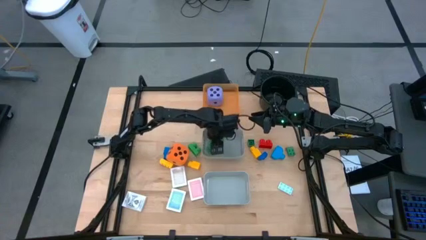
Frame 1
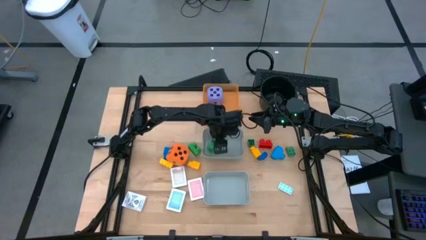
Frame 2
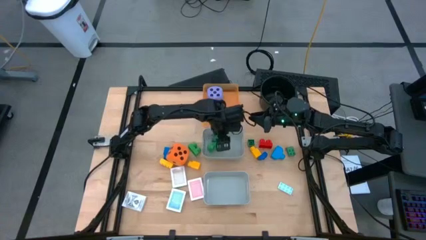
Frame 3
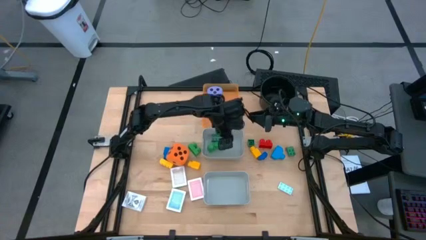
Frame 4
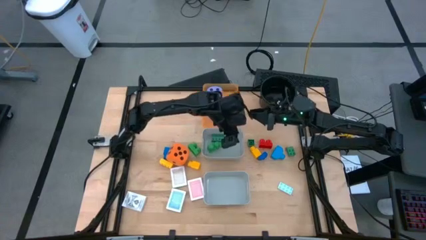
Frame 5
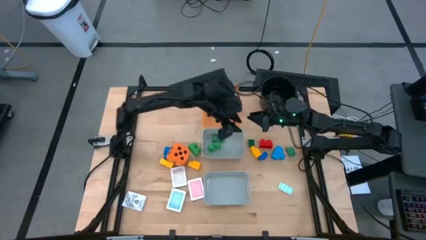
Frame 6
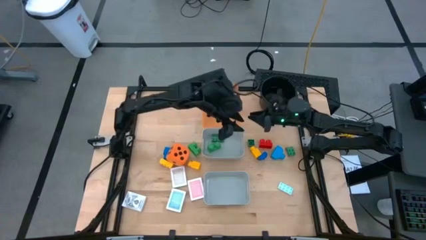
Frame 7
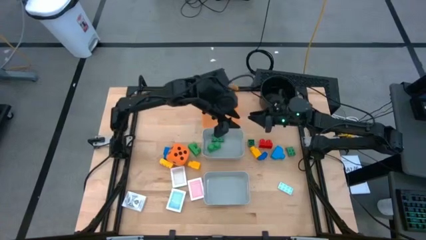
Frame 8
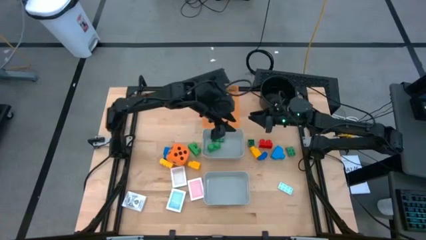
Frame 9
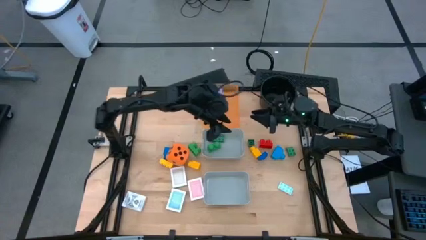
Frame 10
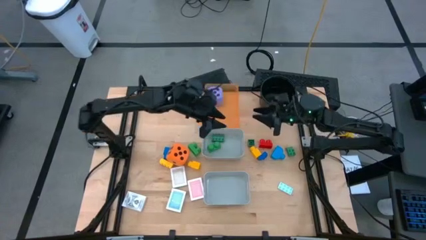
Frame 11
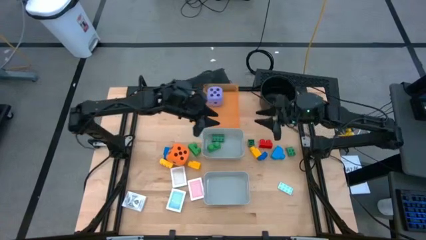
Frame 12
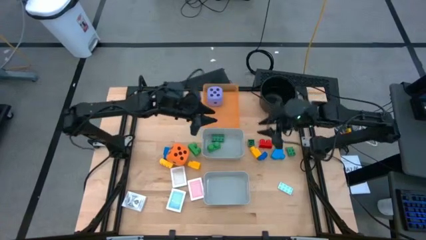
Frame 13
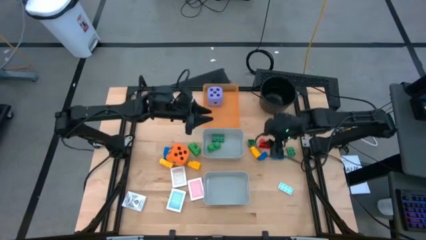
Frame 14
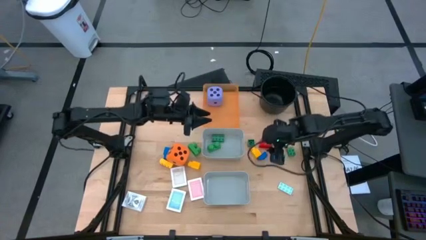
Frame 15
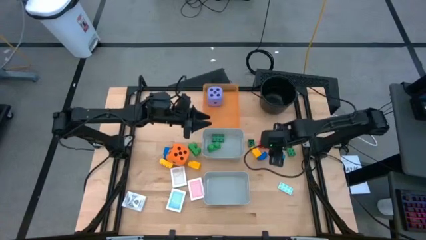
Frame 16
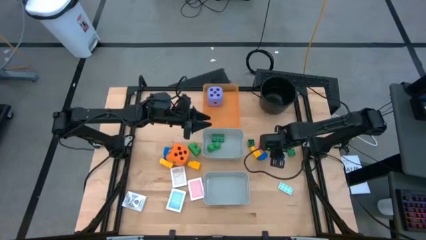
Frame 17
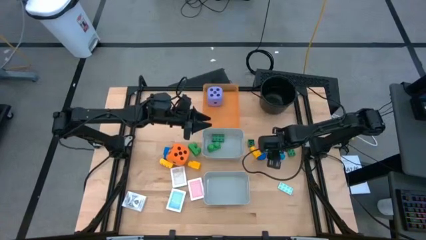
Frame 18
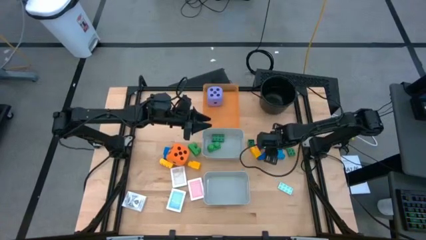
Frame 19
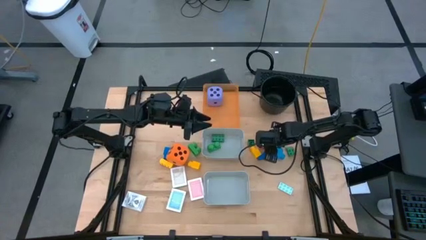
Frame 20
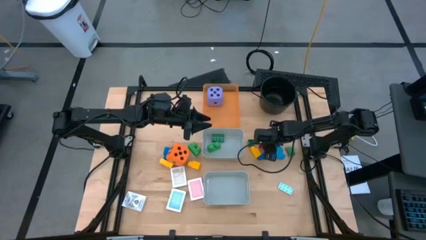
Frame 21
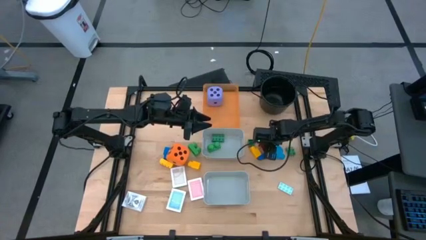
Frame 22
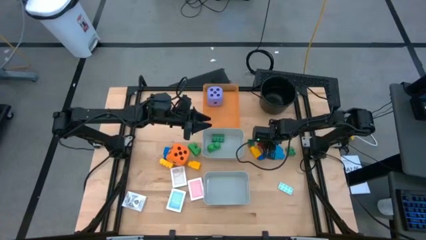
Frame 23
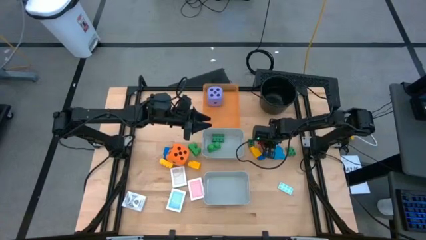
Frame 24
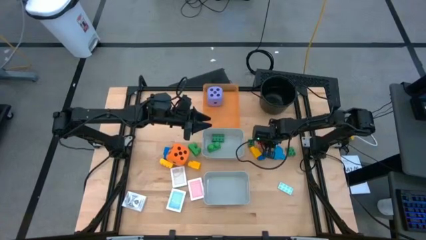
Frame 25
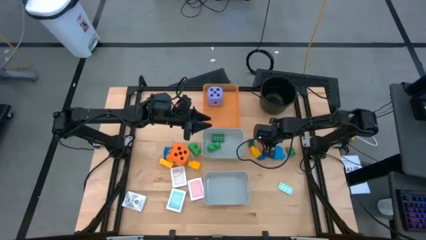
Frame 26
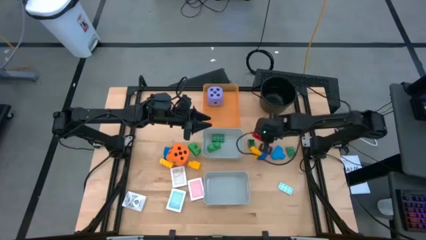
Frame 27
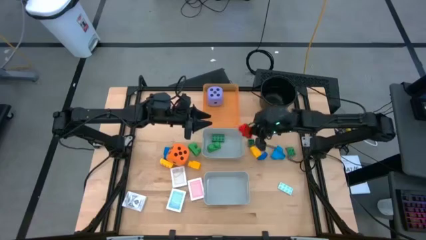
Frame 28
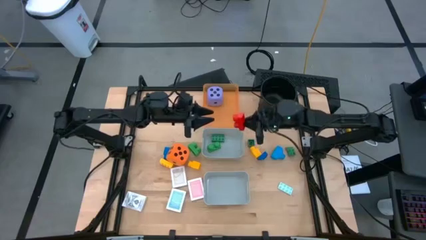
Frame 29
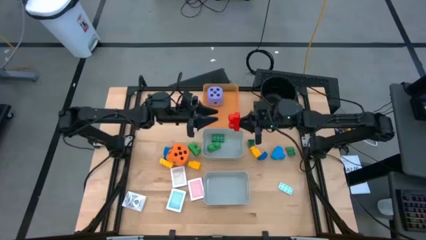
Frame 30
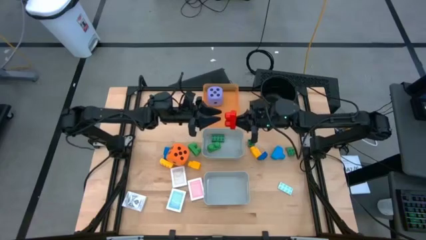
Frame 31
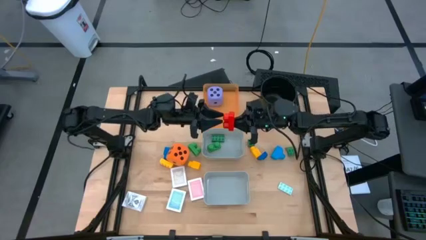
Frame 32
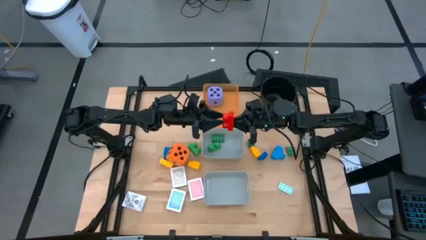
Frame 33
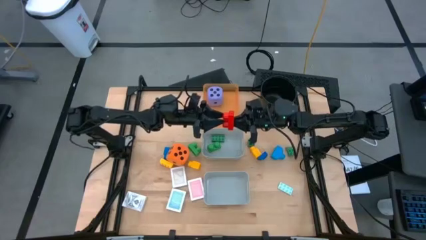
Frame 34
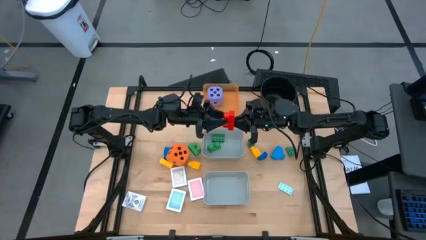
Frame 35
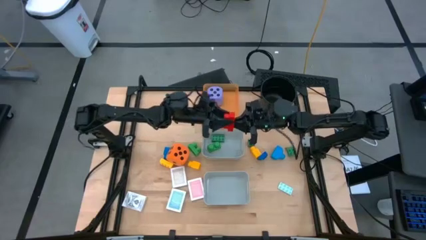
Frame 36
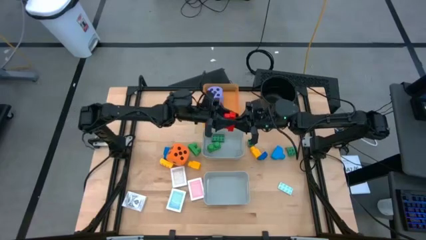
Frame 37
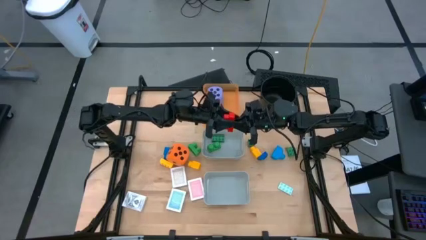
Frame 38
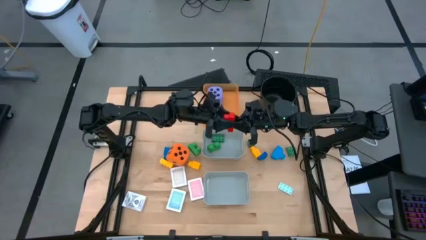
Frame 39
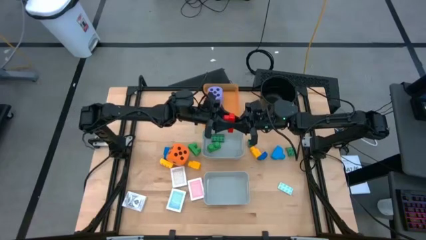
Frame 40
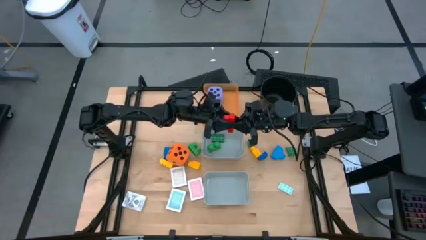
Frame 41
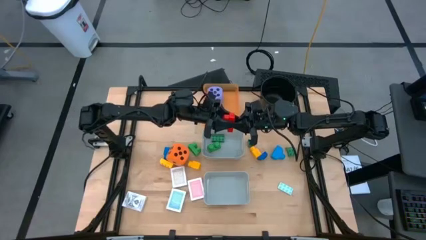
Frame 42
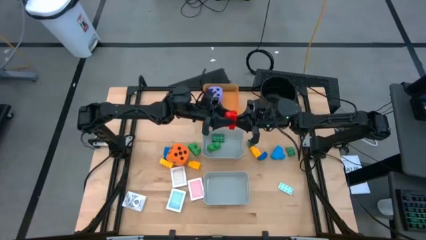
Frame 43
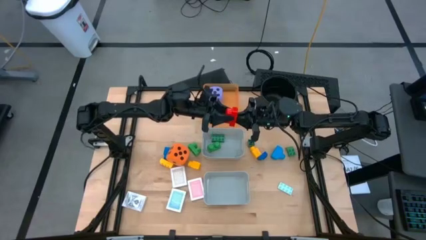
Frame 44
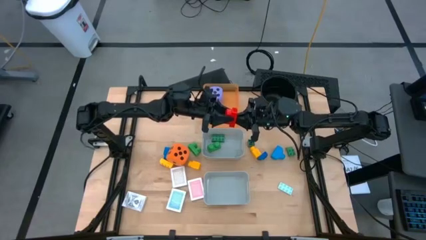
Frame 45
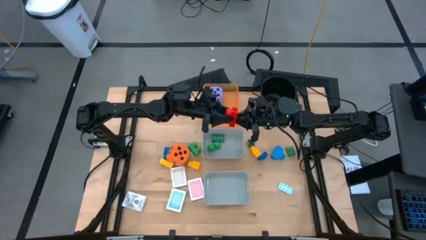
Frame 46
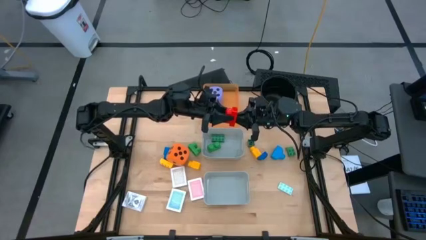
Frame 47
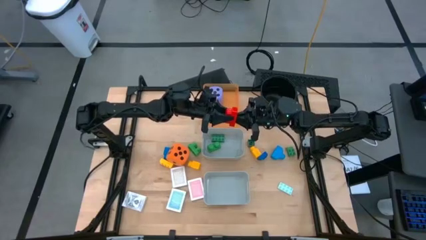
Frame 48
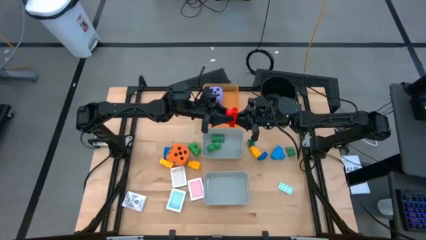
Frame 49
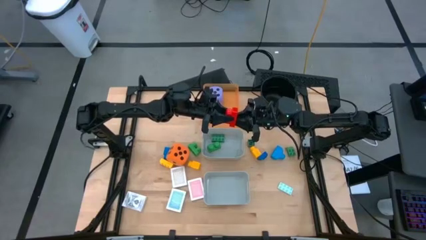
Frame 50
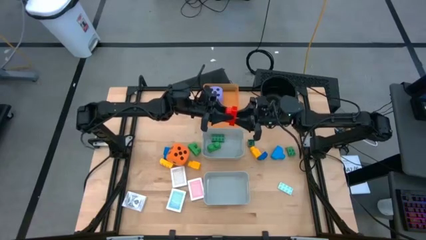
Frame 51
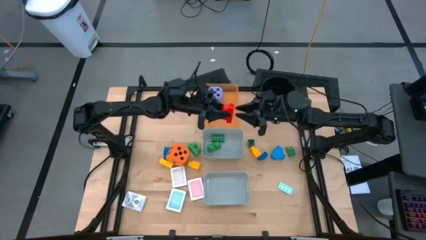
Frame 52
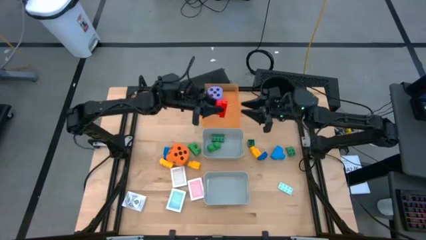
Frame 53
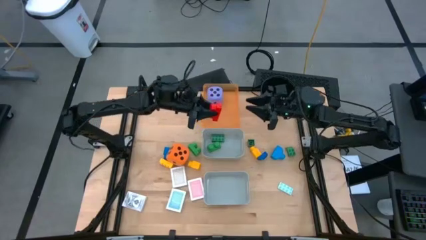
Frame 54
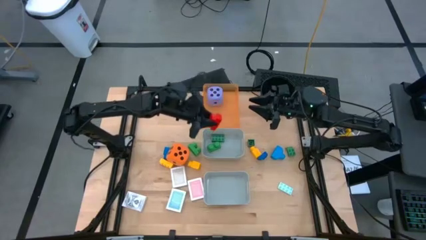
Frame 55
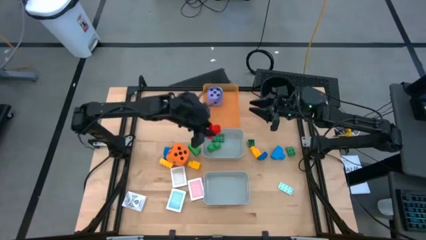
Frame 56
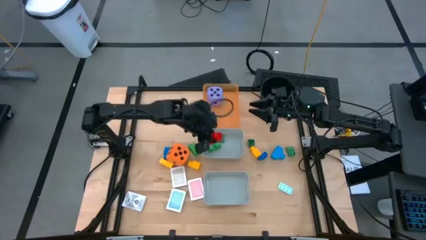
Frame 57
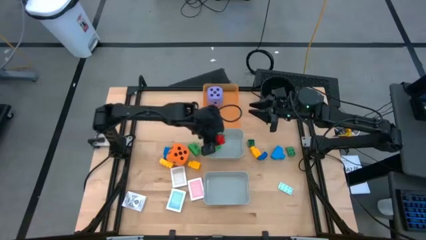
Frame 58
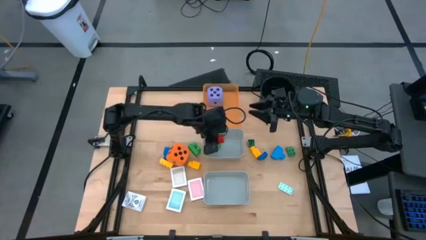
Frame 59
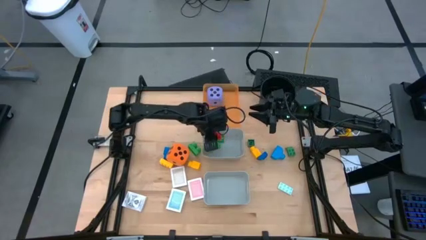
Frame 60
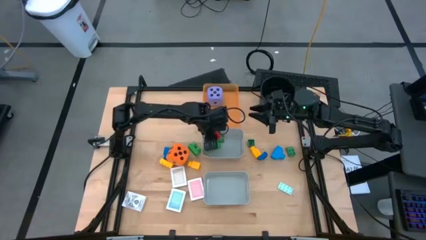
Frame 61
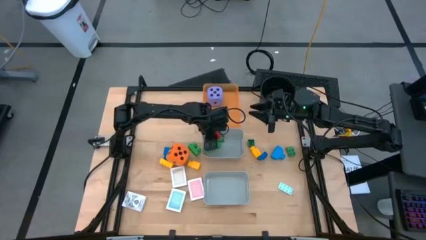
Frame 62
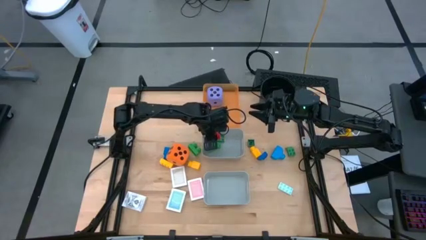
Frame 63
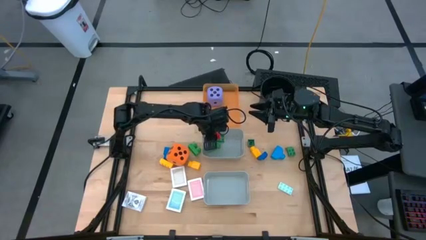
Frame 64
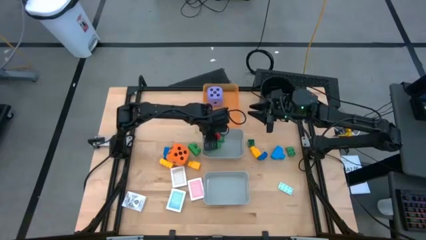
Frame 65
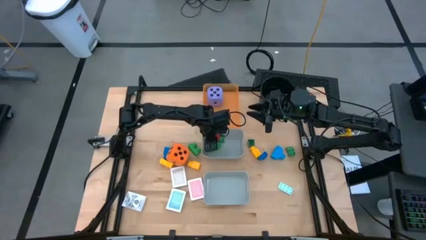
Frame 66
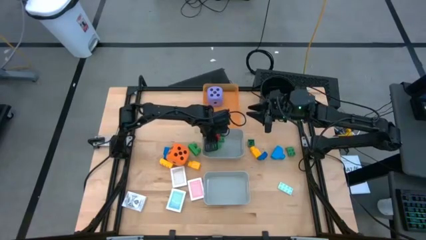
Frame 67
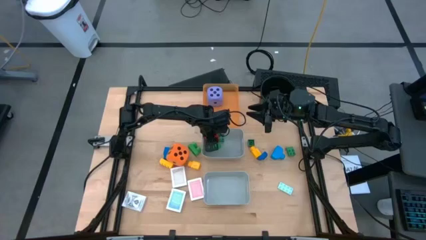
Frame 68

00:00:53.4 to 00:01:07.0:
Task: Pick & Place Toys
Put the red game piece into the top gray bin
